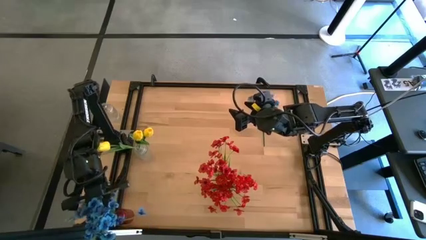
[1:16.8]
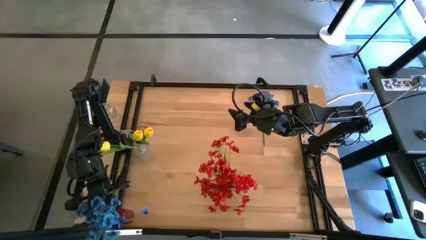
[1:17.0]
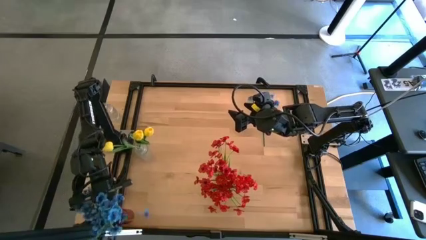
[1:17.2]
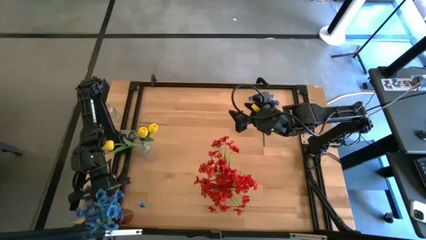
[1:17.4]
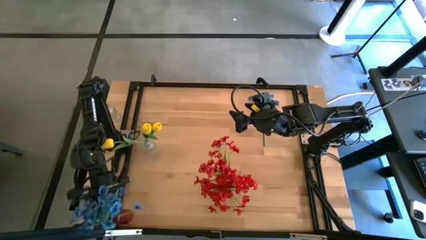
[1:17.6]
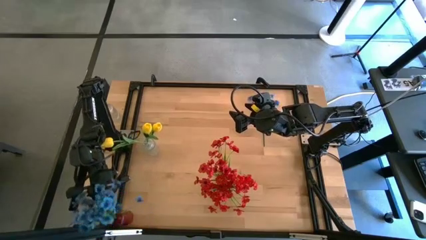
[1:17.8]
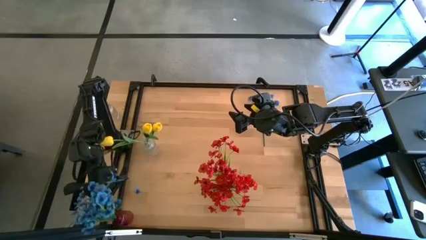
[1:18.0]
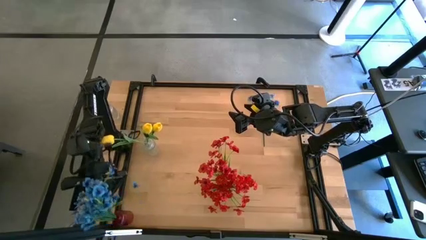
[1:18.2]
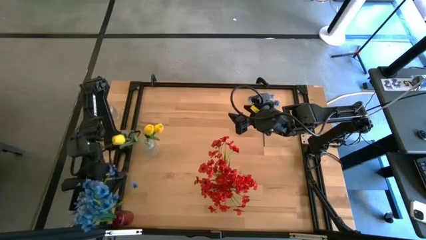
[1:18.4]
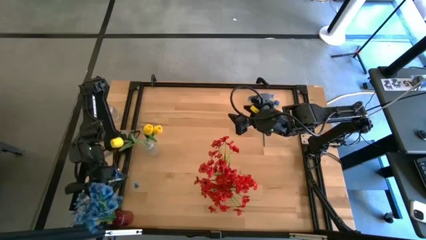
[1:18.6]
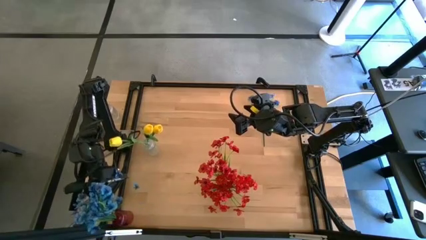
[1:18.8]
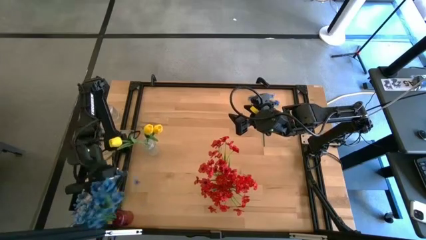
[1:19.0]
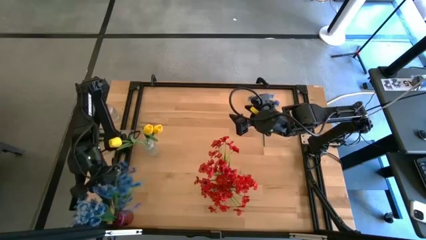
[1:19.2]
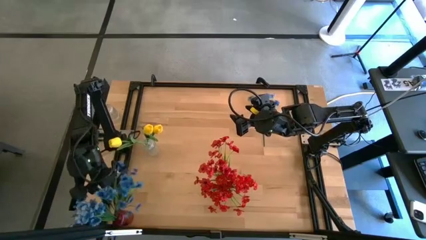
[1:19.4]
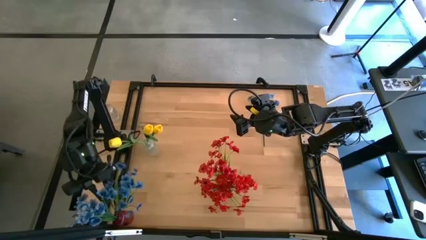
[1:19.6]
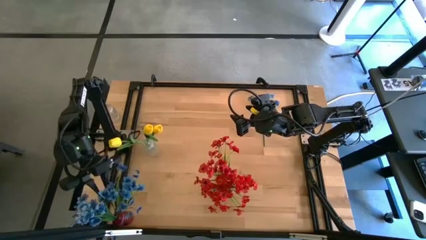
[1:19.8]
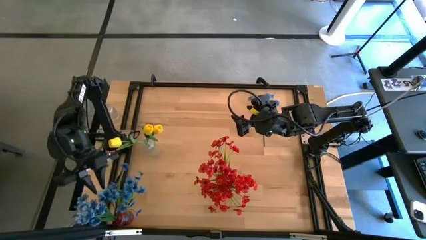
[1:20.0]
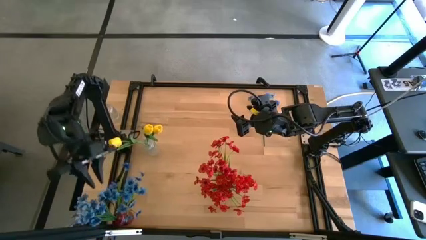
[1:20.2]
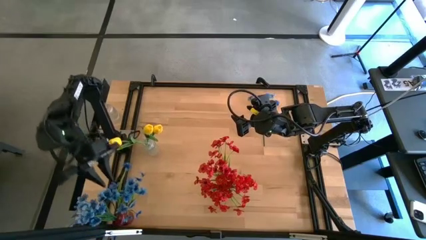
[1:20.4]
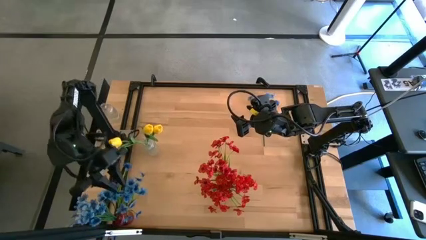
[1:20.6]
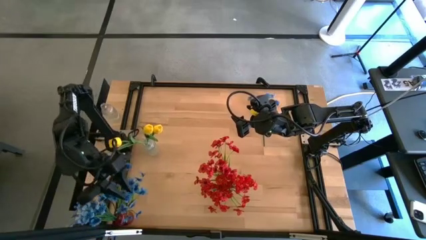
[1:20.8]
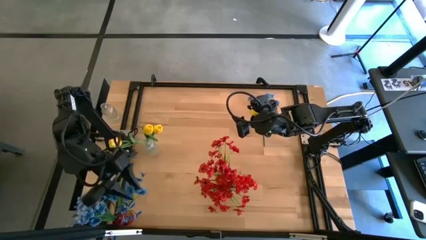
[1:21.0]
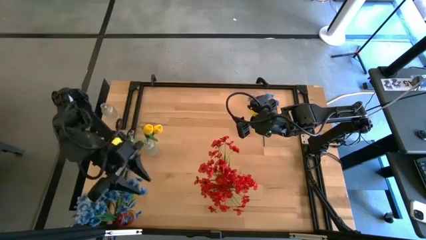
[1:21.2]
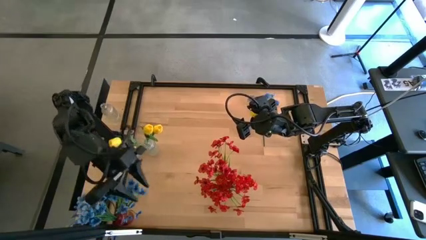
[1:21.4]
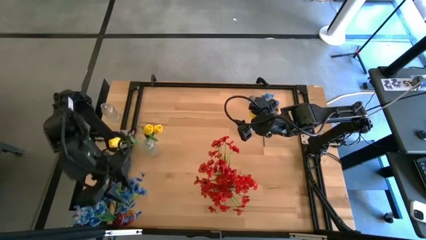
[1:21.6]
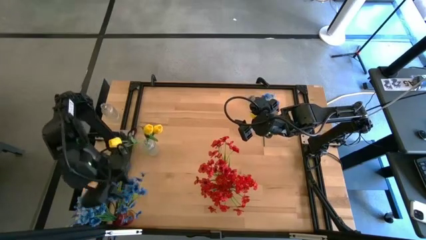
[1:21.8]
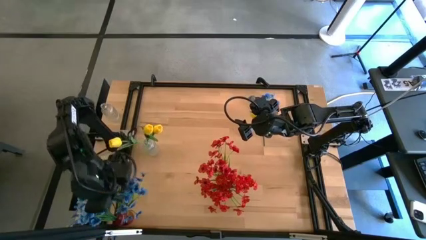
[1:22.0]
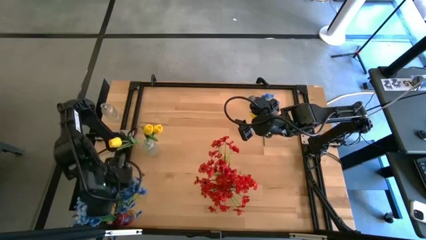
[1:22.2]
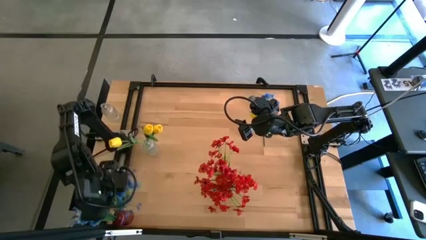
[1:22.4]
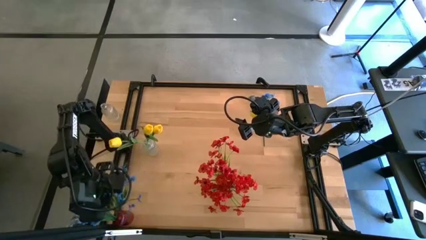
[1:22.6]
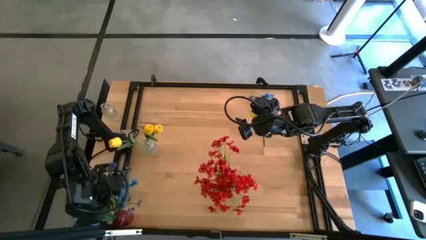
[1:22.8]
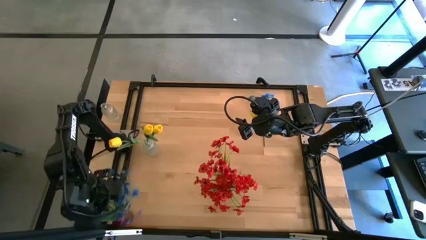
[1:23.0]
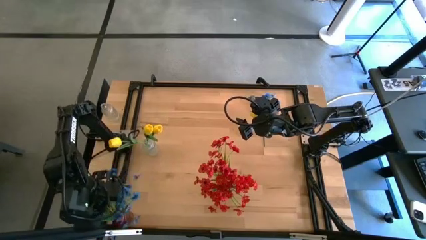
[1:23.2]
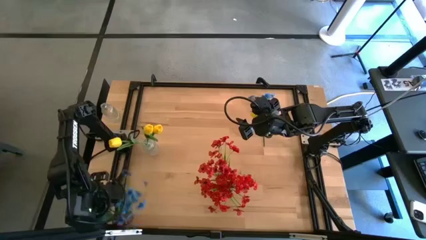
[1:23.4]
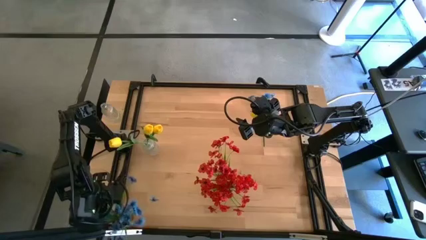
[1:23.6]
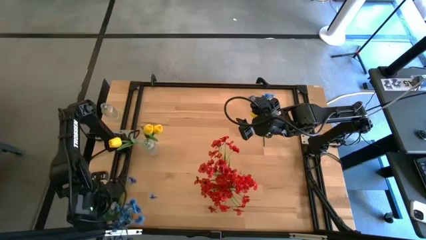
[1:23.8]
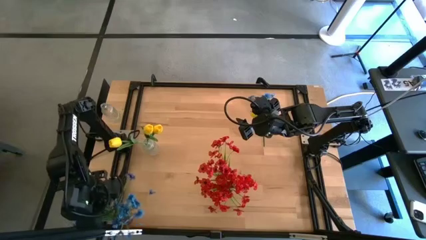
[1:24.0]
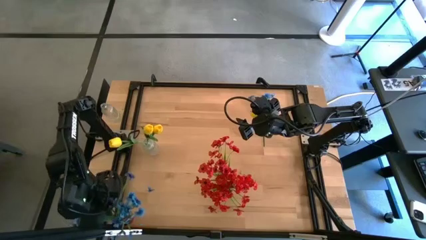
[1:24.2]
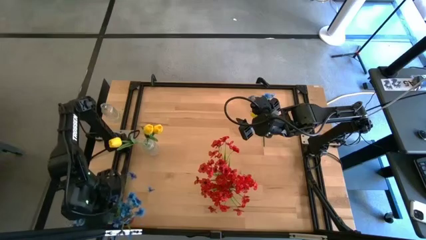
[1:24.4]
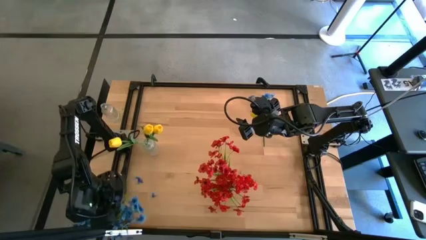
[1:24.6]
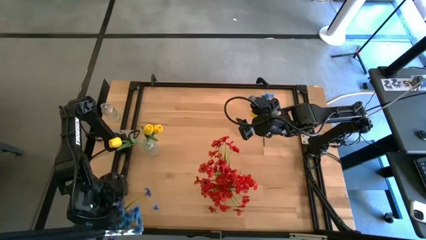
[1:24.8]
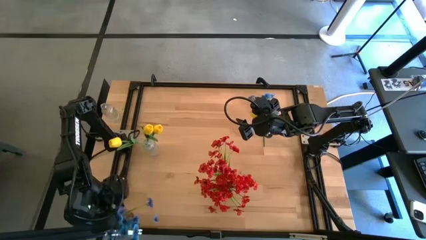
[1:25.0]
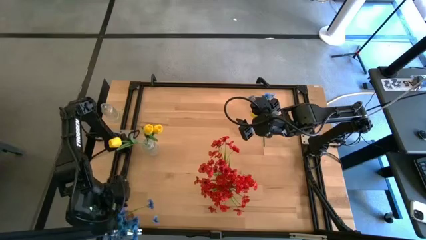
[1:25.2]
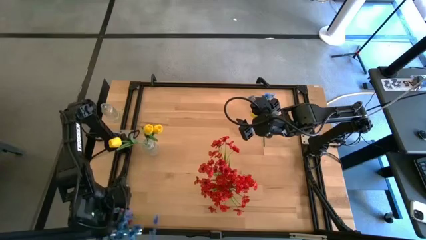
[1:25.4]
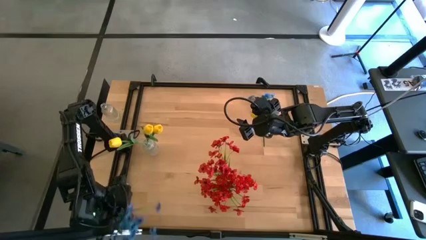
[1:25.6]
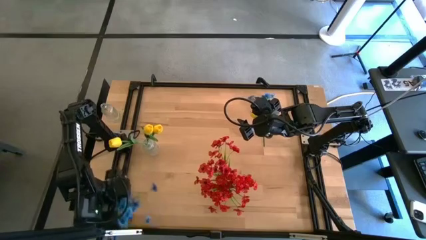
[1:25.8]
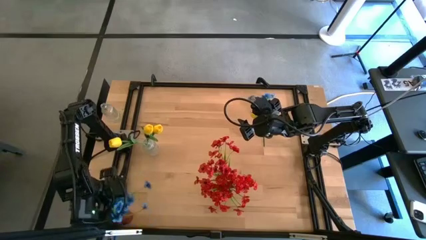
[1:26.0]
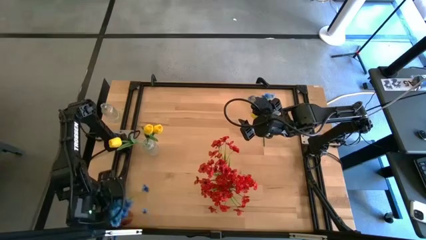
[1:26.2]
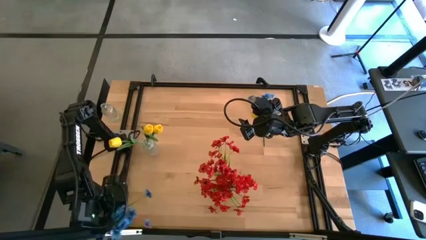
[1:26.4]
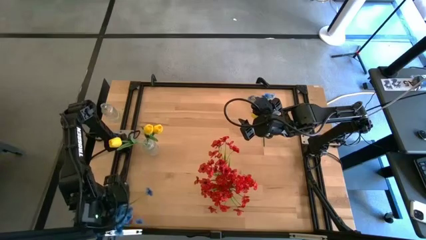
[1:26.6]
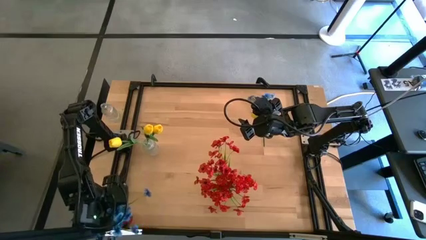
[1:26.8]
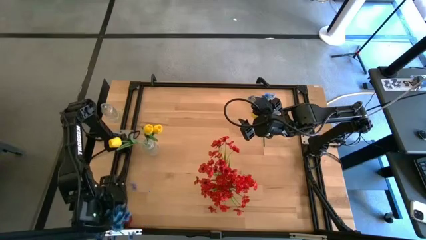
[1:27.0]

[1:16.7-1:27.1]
Task: Sort flowers into vase by color
Put the bottom blue flowers into the red vase

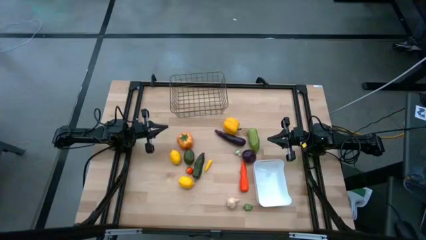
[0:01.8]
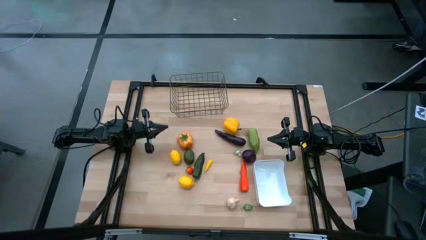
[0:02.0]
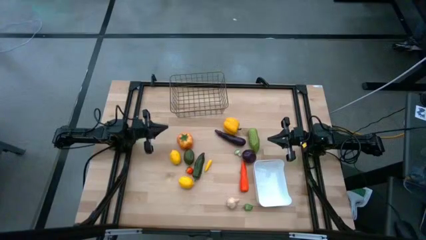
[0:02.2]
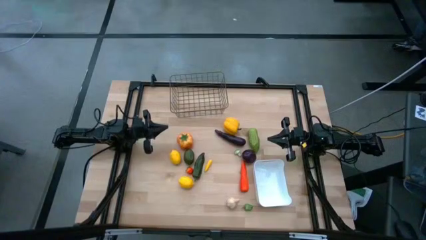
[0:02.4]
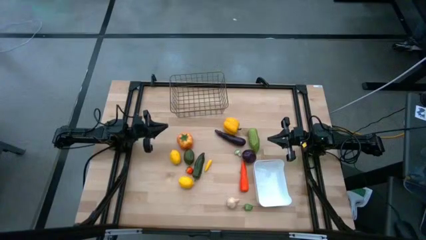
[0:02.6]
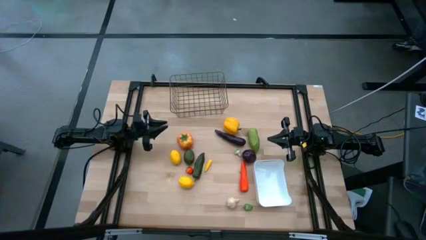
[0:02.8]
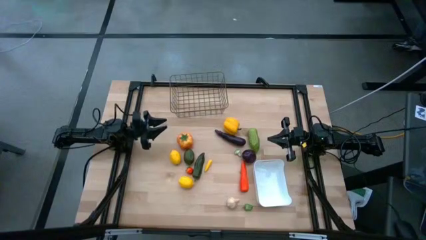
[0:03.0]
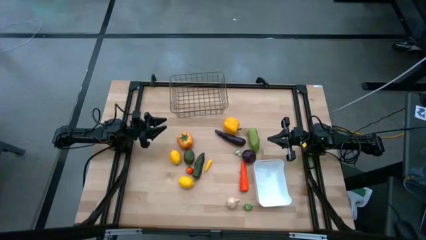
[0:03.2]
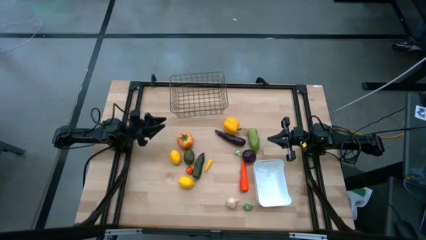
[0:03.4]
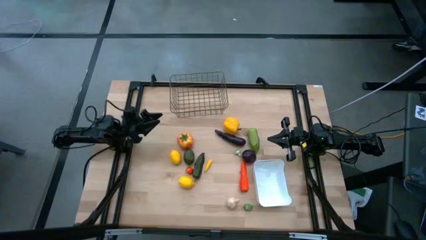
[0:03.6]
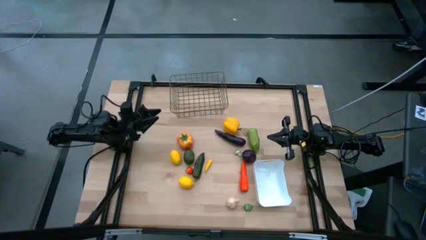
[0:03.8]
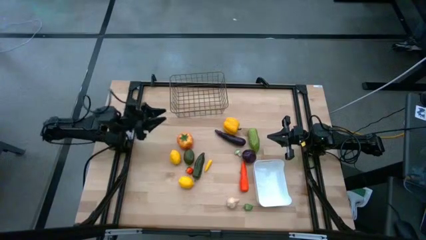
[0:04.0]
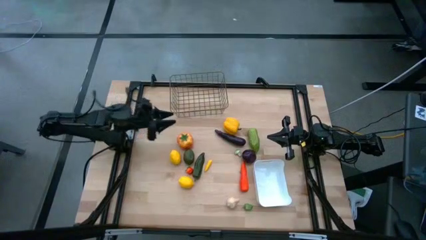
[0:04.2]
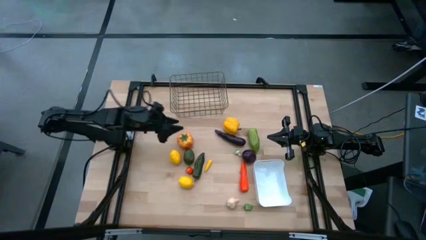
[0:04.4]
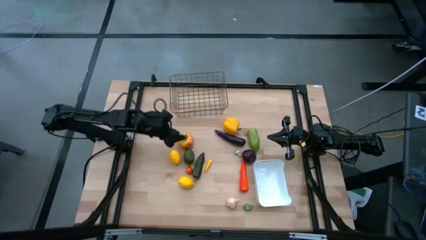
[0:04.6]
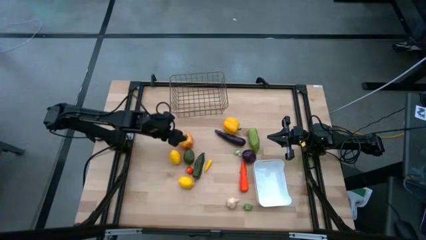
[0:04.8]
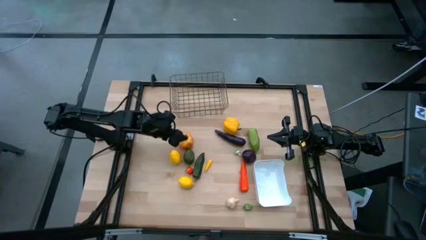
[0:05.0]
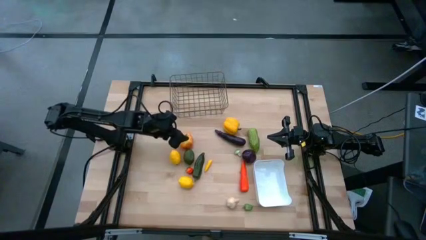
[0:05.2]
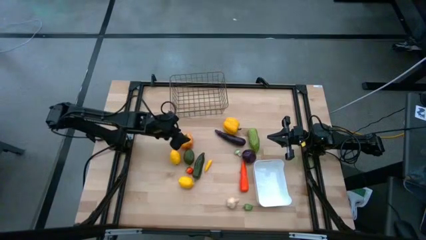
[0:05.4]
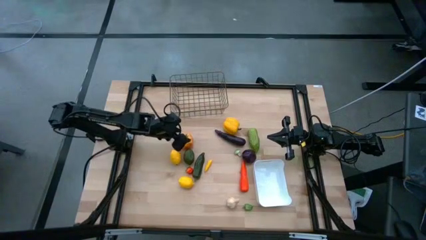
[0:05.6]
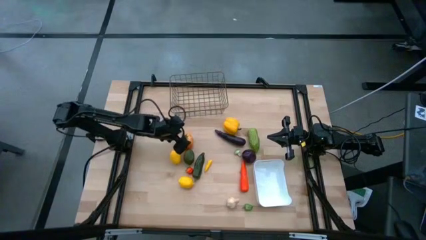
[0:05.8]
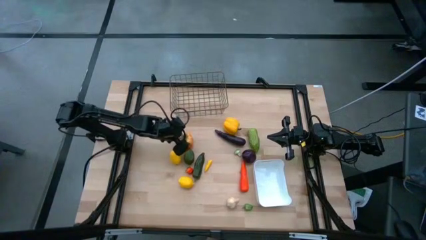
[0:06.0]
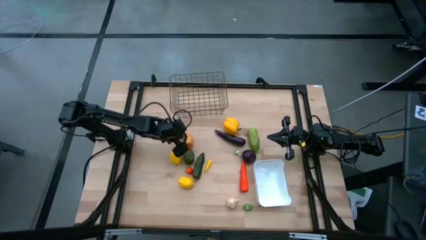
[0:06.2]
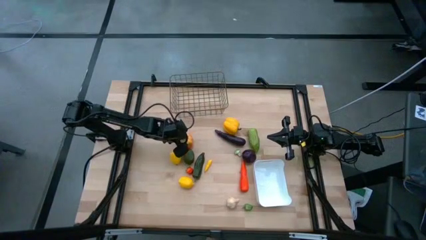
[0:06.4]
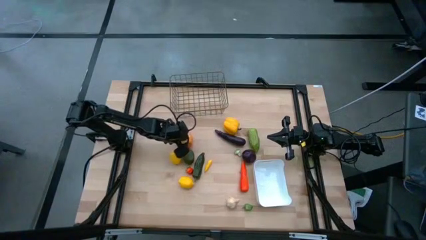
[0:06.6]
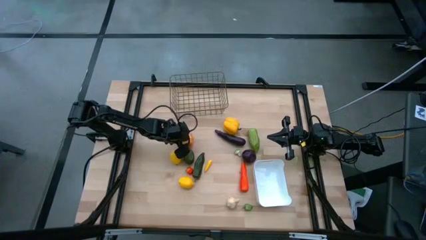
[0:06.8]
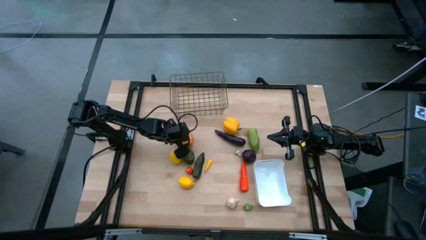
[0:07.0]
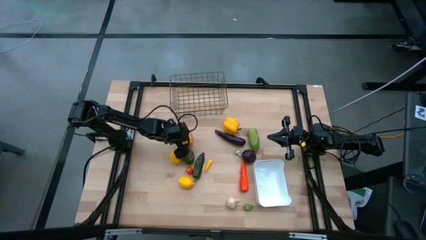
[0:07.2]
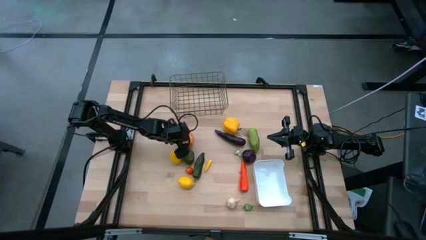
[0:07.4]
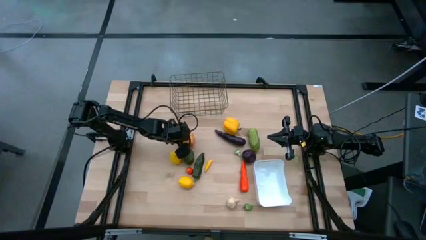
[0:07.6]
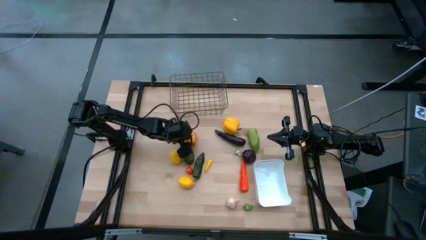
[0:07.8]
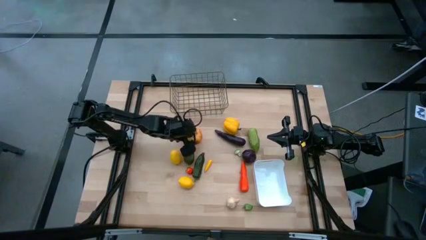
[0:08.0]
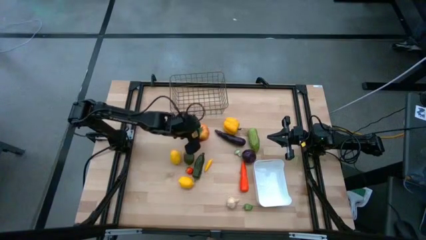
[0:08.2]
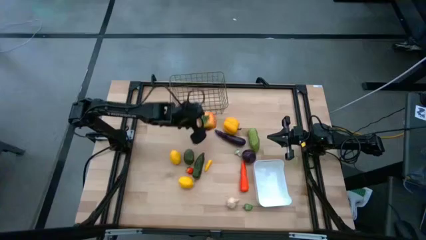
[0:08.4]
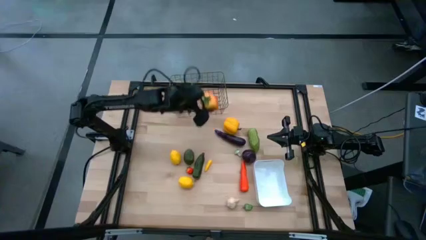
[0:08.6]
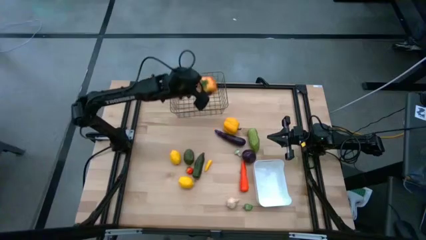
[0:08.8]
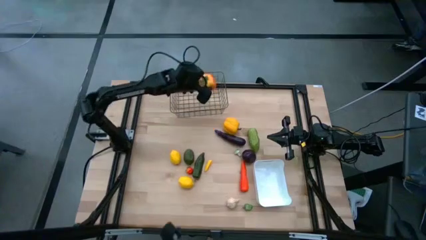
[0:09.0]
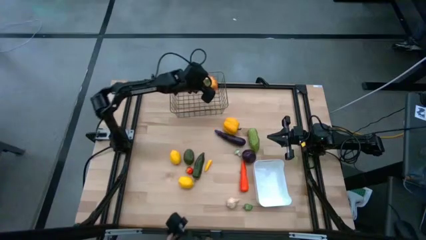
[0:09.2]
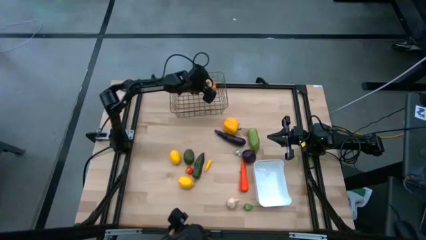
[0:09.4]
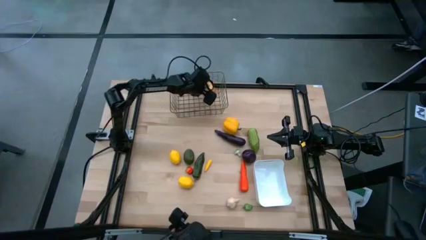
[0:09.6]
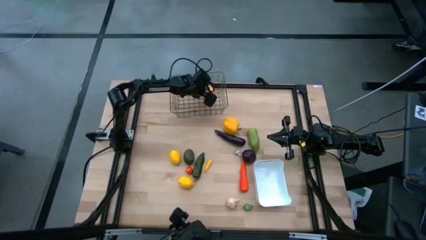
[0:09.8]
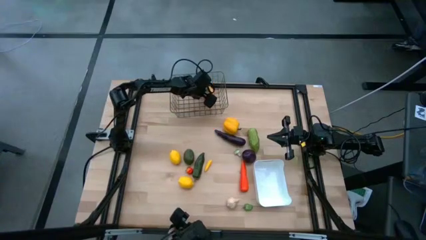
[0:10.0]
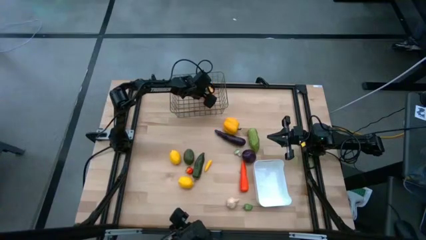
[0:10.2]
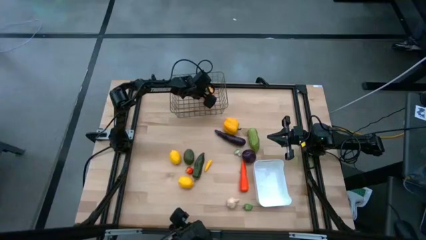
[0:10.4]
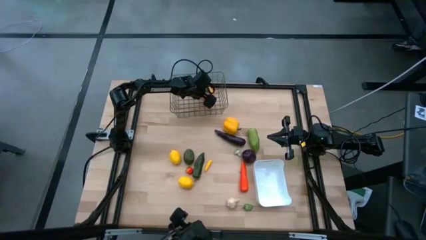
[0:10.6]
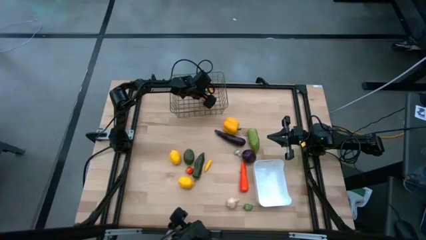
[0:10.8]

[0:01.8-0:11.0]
Task: Sort produce into baskets
Put the tomato into the mesh basket
